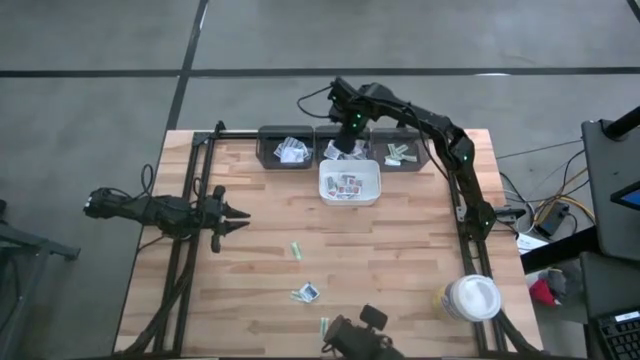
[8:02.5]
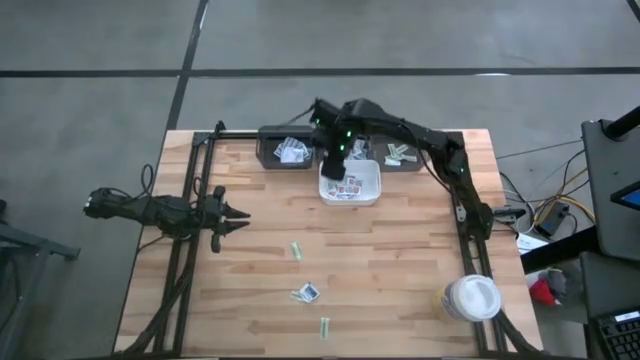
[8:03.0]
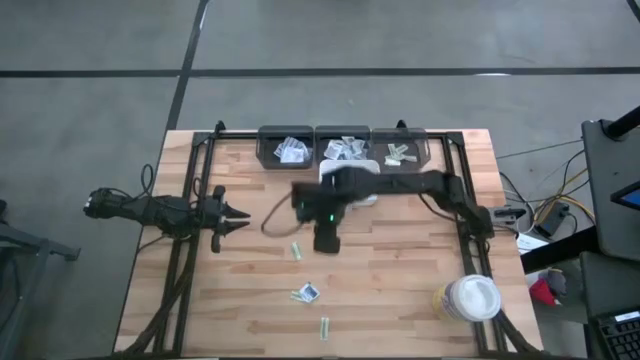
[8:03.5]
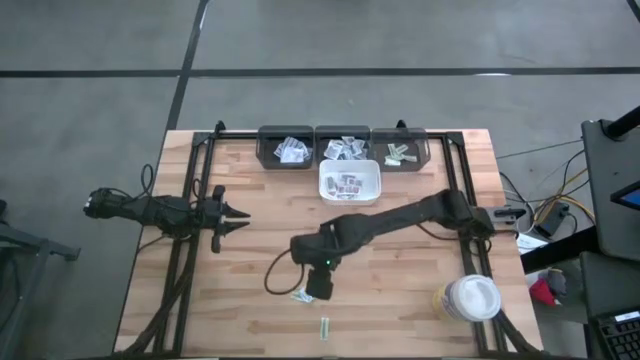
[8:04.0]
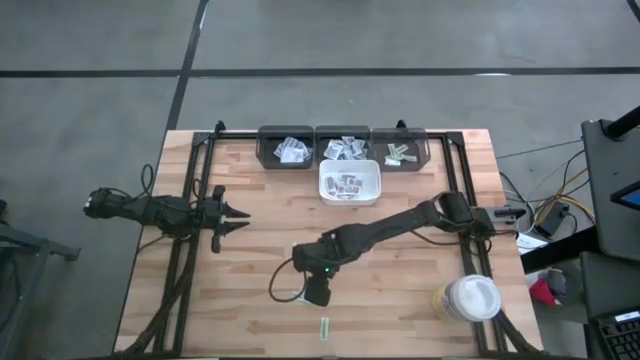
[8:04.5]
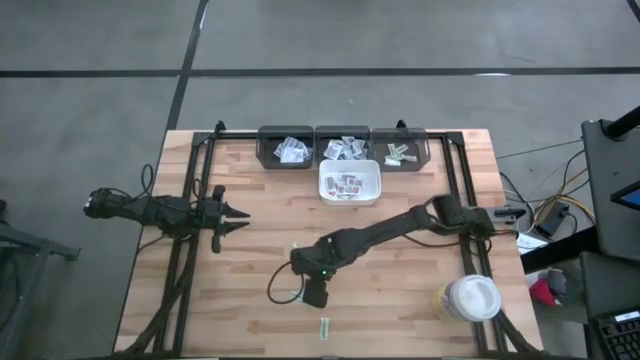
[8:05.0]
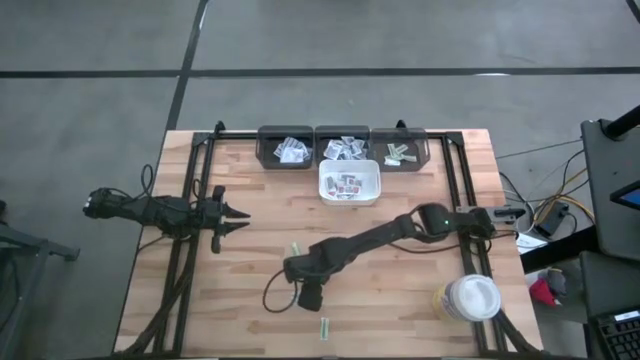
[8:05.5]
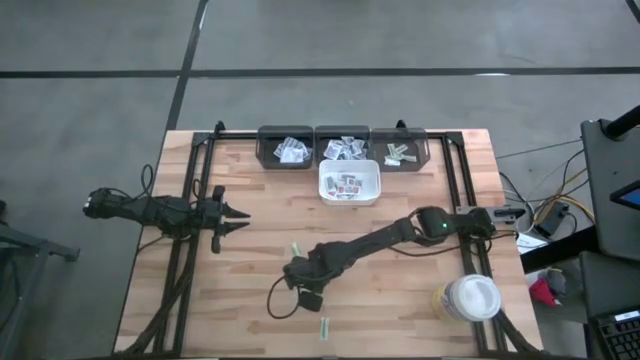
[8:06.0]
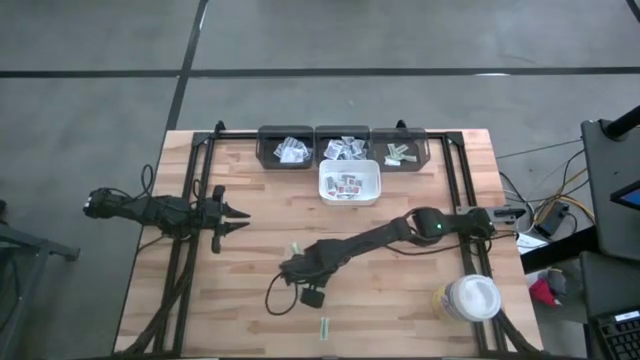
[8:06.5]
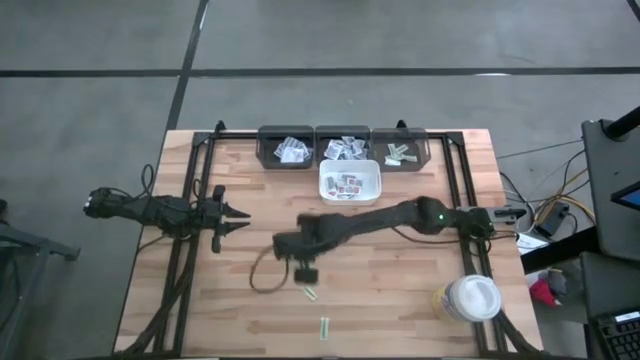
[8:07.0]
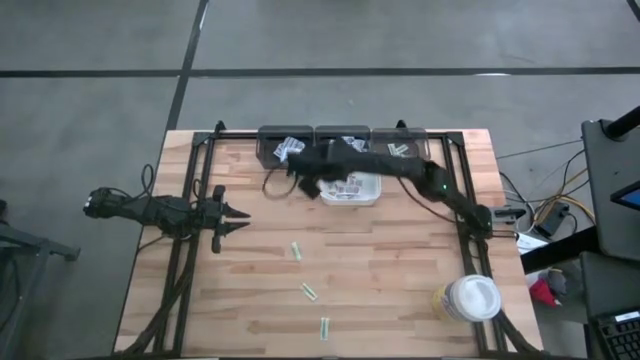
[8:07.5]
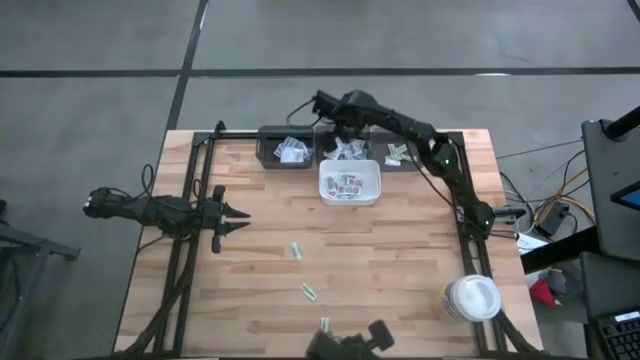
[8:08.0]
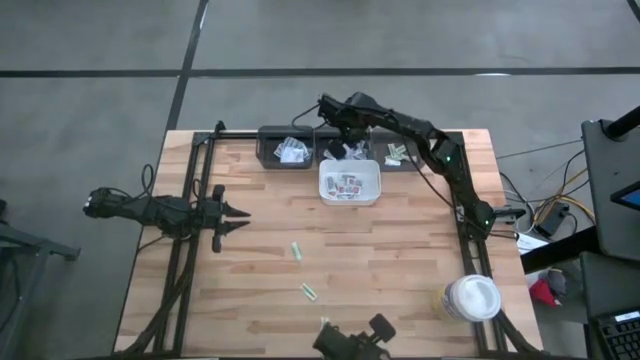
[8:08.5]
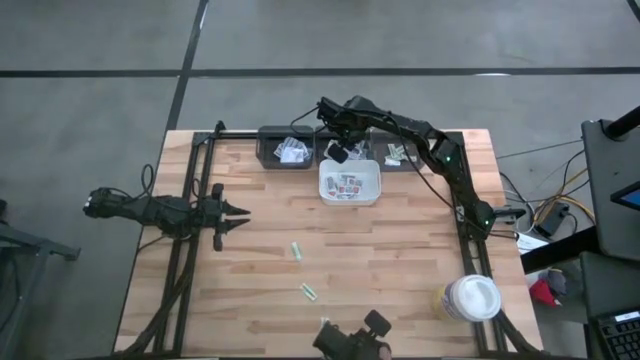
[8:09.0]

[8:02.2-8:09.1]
Task: Pick & Place First Aid Supplies
Put the blue alcohol pad into the middle gray bin

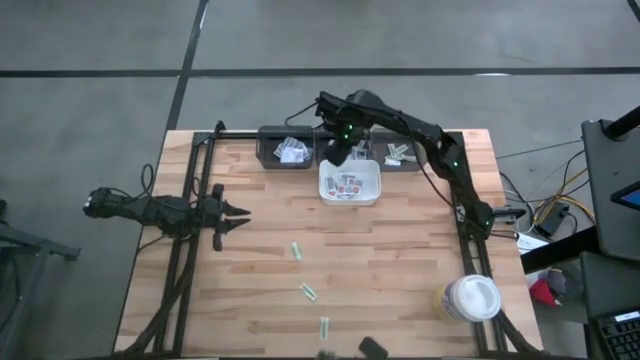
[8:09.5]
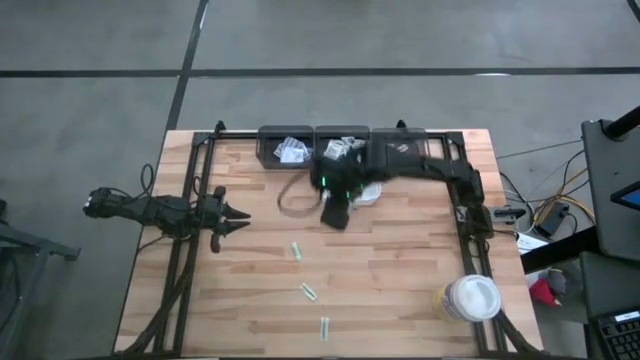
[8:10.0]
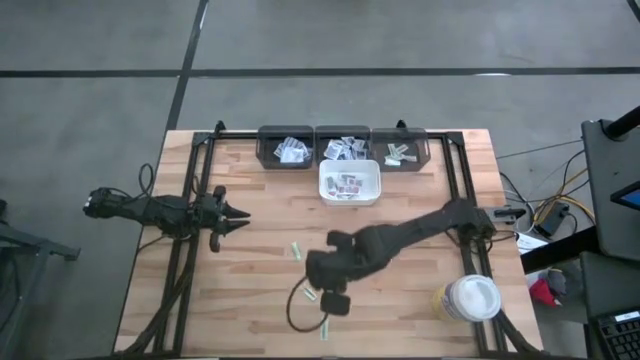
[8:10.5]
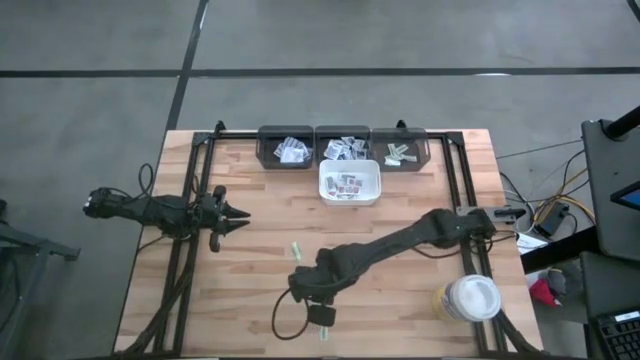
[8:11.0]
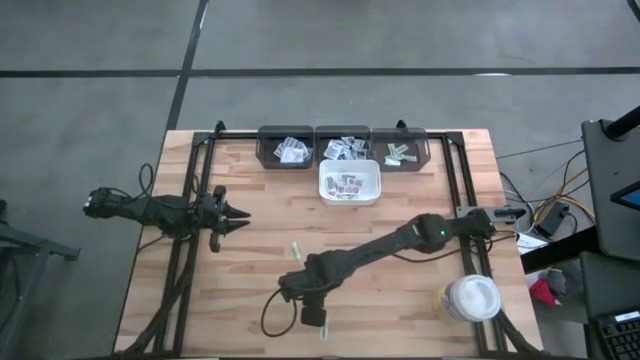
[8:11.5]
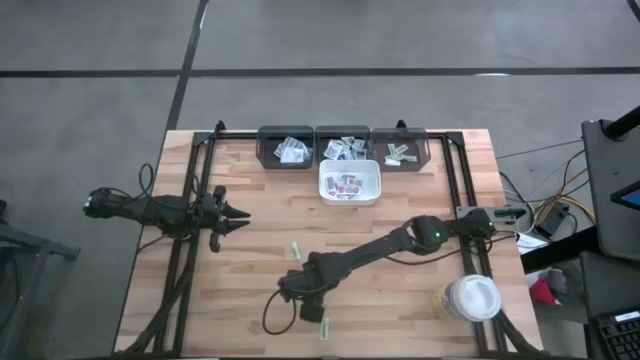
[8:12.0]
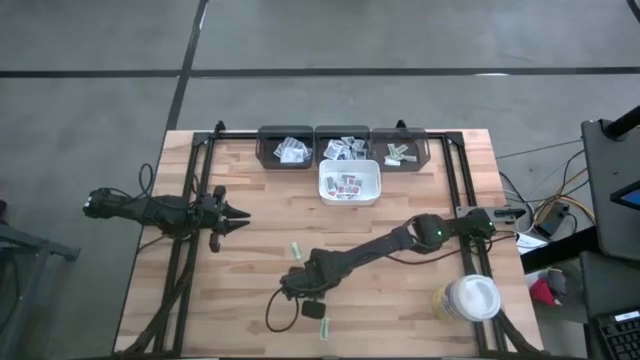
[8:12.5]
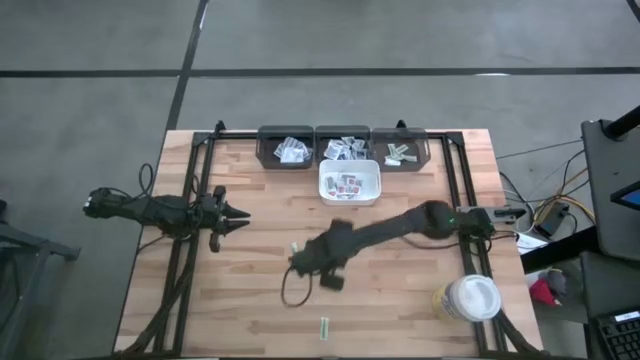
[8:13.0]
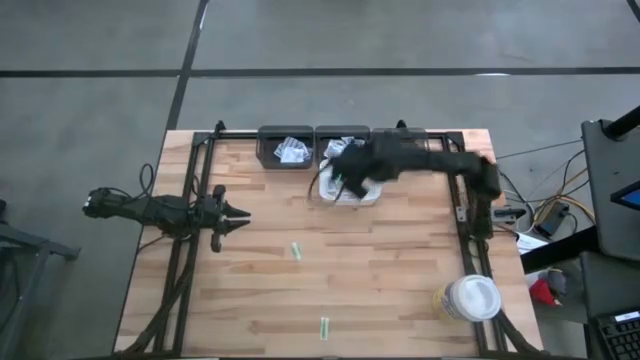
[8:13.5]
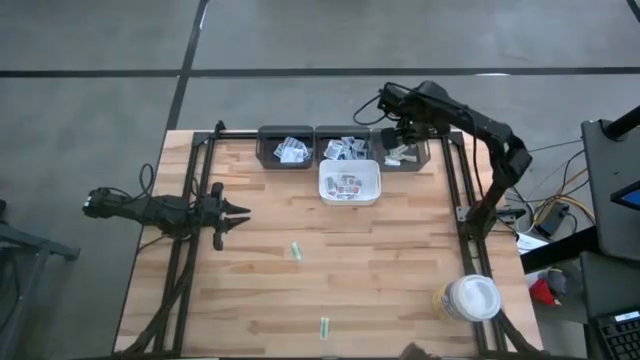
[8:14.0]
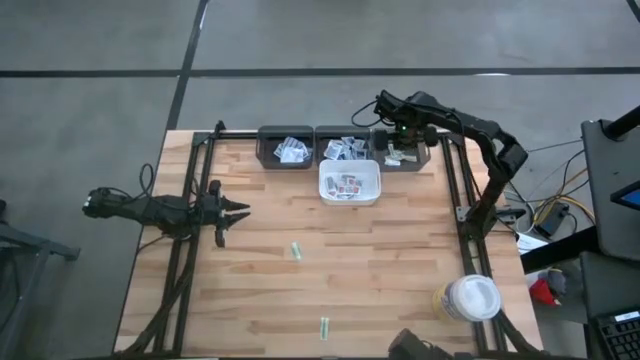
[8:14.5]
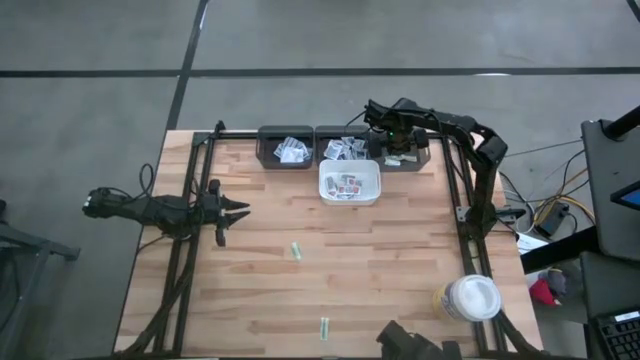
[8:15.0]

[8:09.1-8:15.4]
Put the middle green bandage pack into the right gray bin

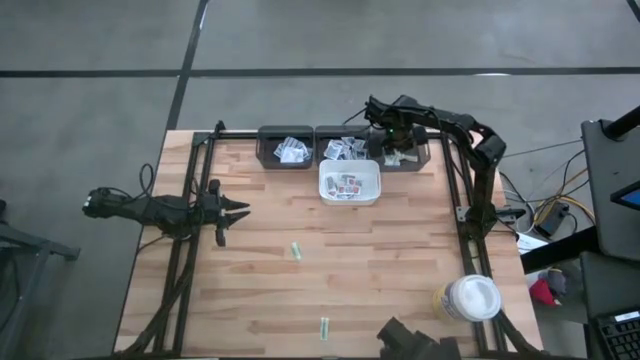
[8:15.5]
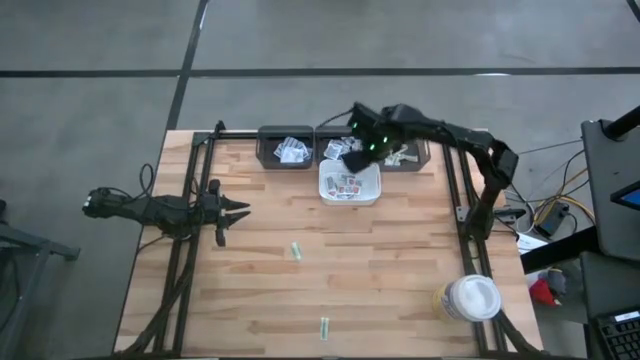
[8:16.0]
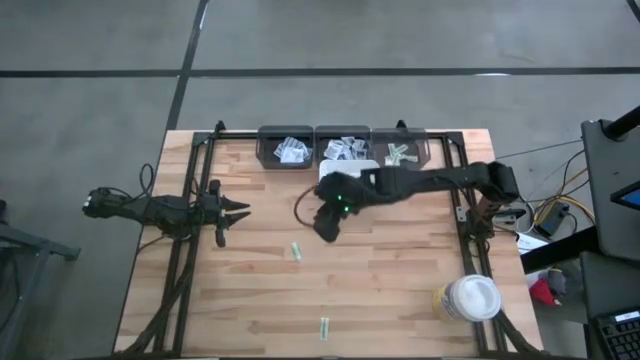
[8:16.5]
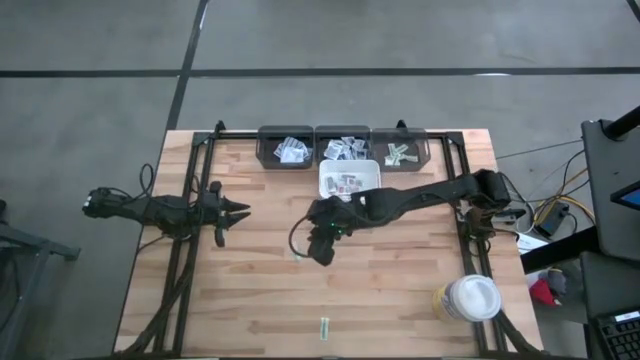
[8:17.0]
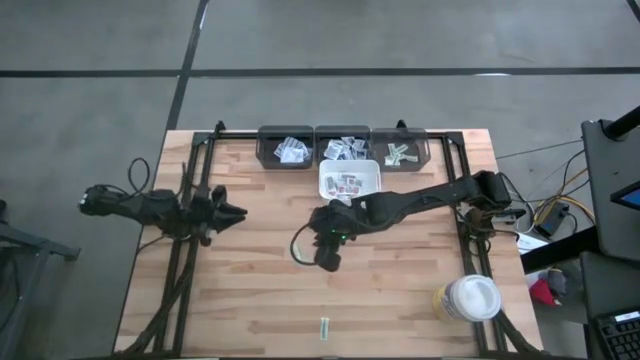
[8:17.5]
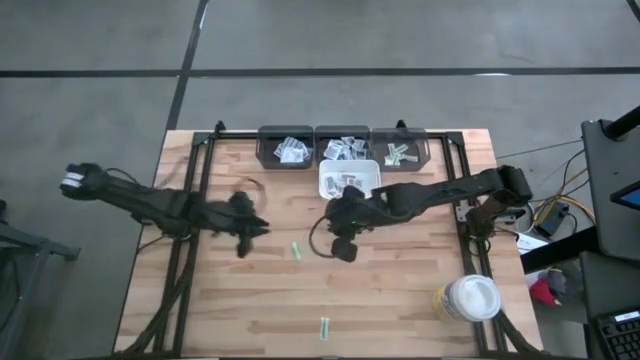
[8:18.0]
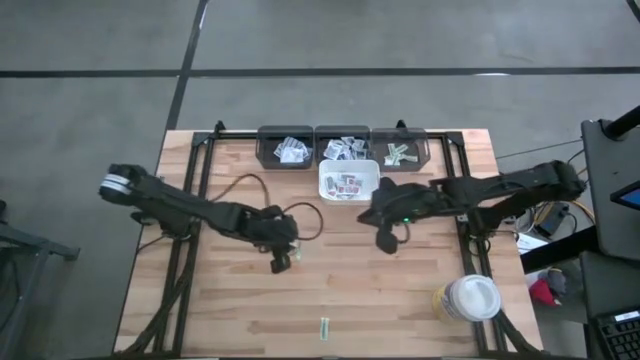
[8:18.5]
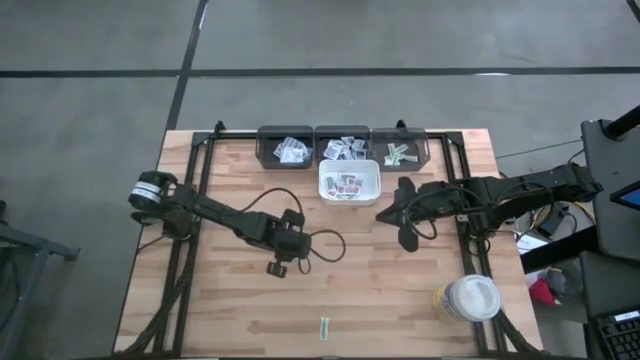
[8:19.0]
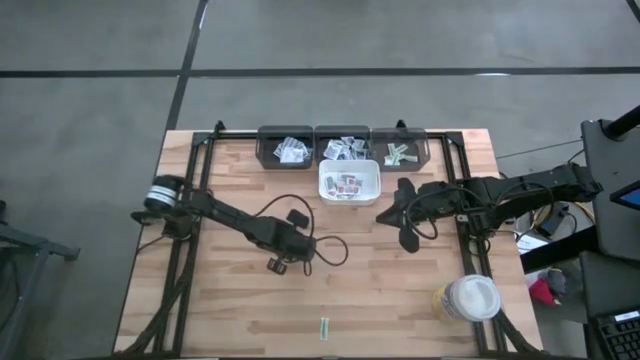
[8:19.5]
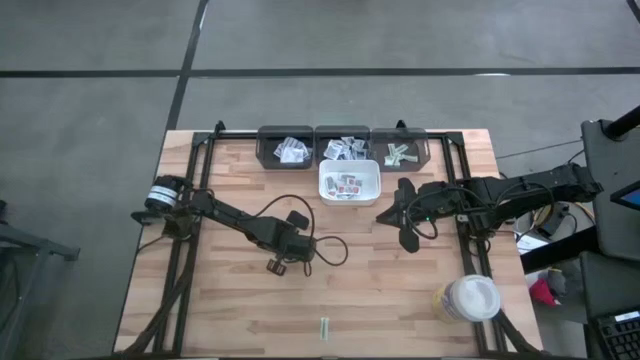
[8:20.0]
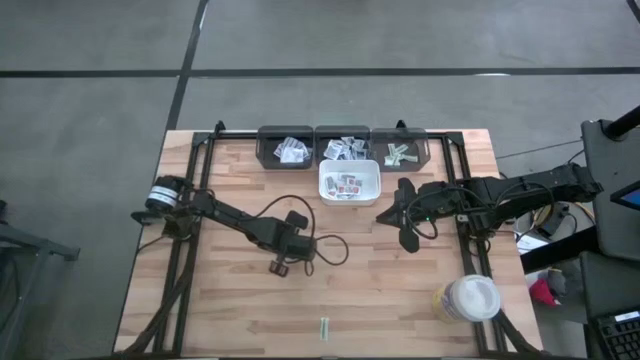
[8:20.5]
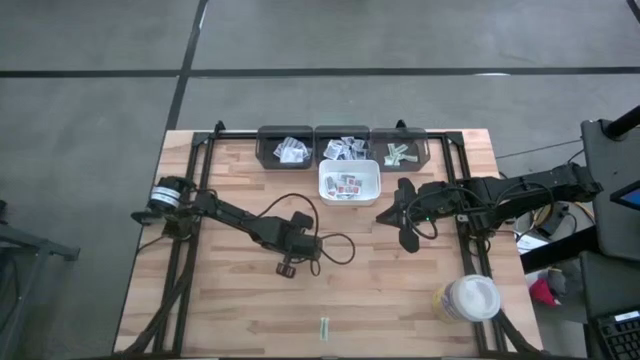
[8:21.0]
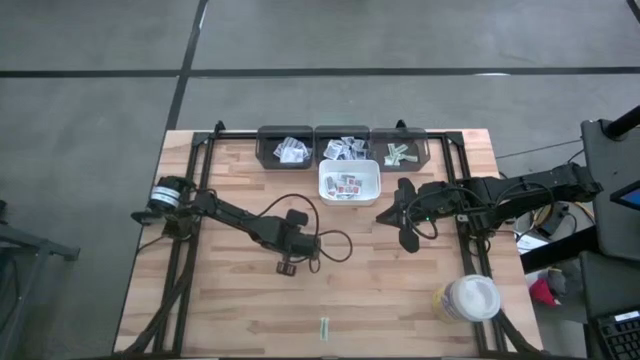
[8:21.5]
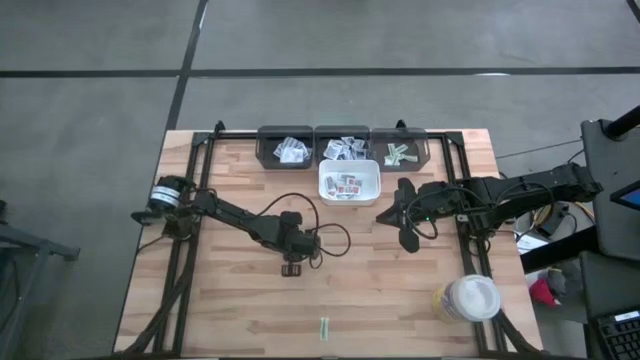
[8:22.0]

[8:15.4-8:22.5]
Put the top green bandage pack into the right gray bin

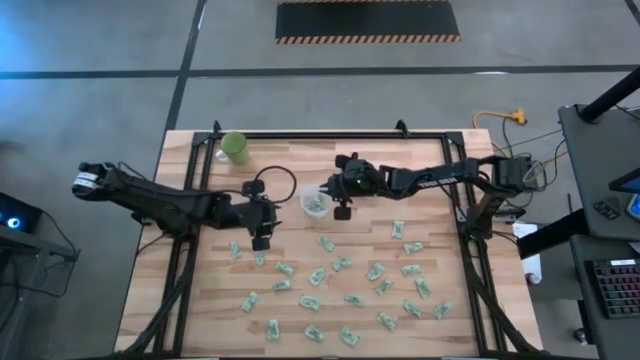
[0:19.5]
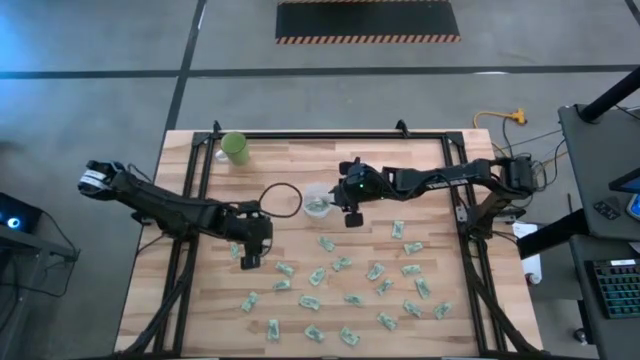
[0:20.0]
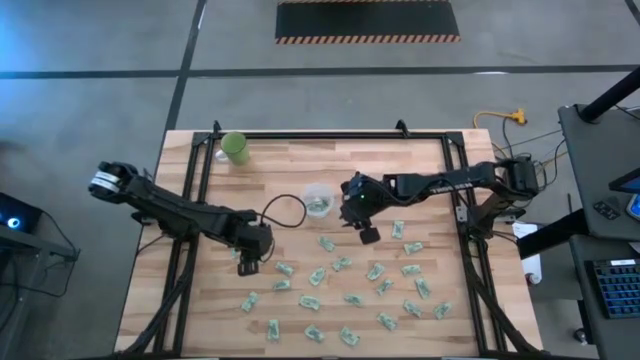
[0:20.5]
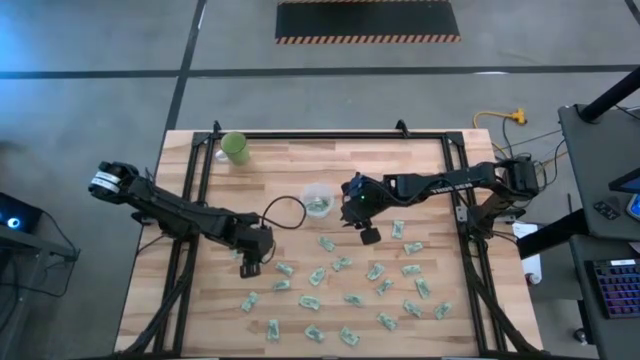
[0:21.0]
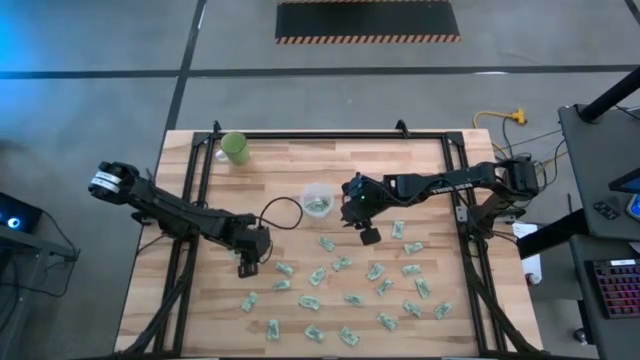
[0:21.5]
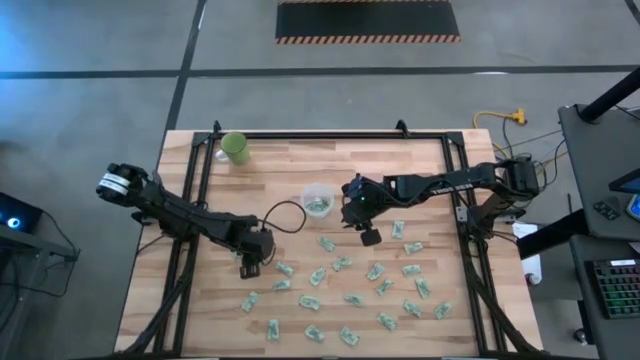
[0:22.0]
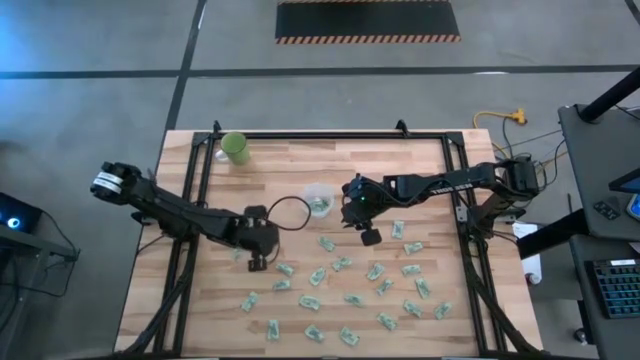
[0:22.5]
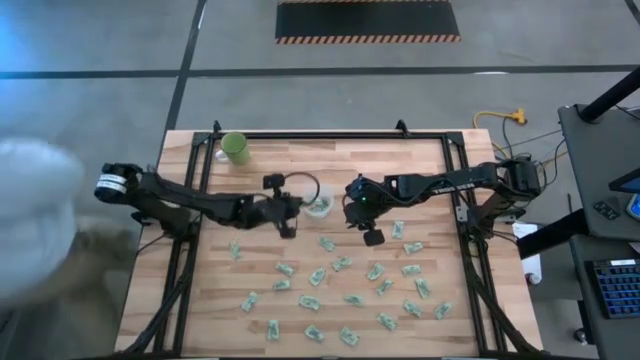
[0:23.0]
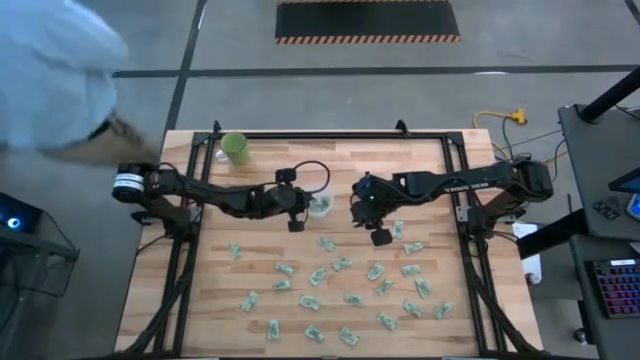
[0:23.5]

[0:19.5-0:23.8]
Task: Pick and place Stevia / Truvia into bins
Put the green stevia packet into the transparent container
